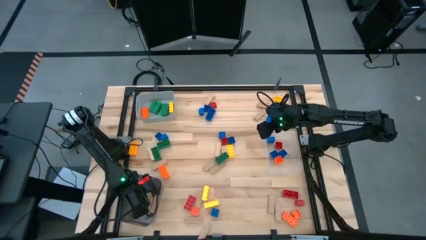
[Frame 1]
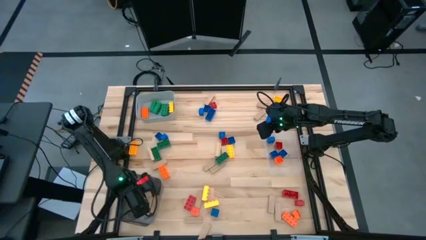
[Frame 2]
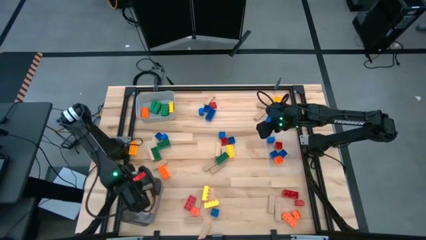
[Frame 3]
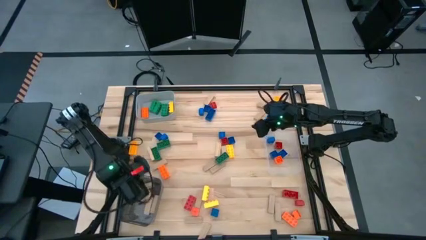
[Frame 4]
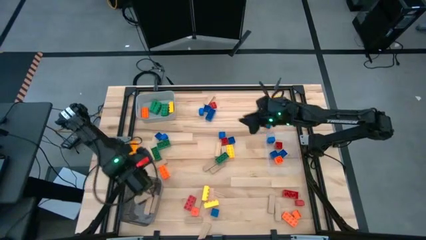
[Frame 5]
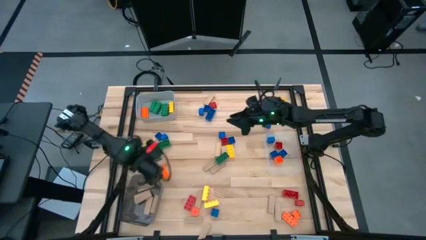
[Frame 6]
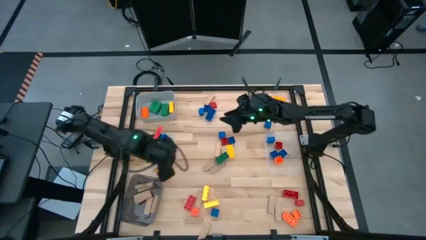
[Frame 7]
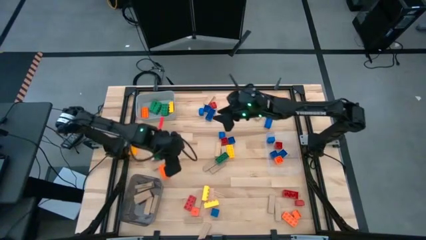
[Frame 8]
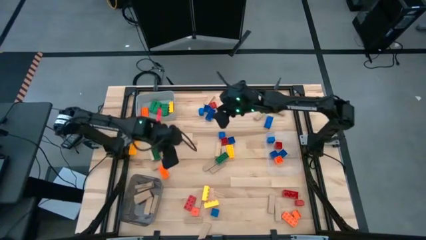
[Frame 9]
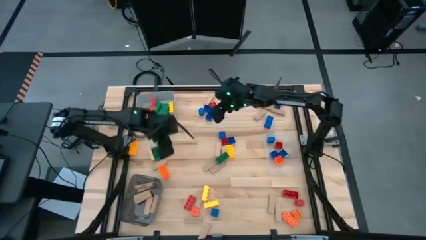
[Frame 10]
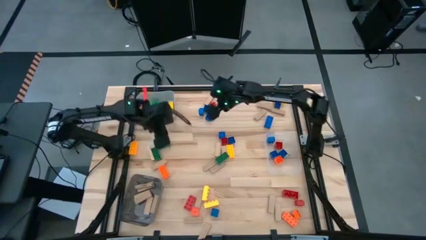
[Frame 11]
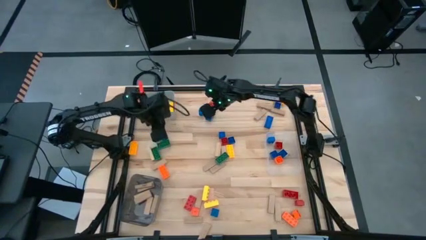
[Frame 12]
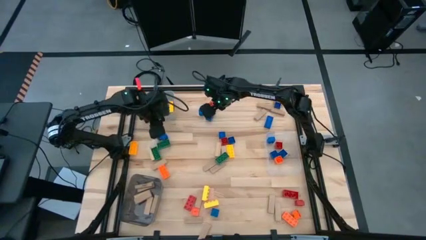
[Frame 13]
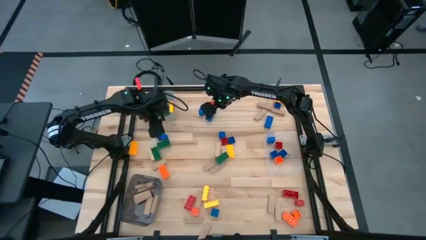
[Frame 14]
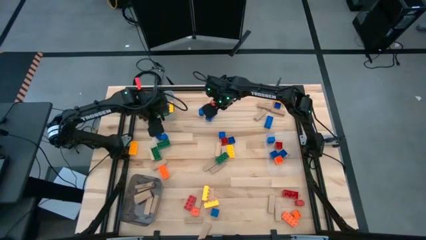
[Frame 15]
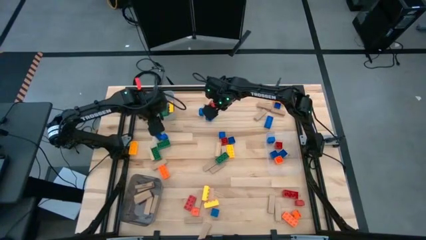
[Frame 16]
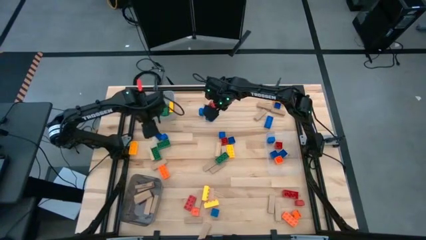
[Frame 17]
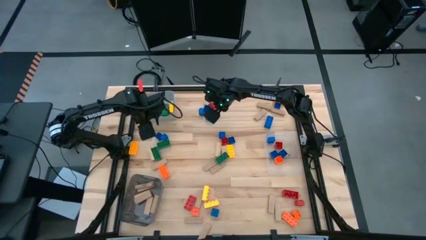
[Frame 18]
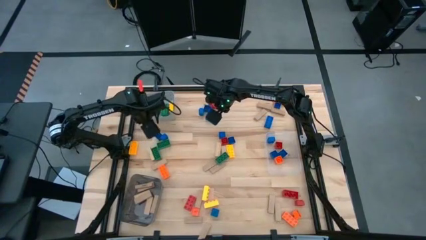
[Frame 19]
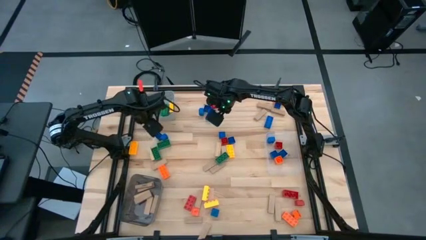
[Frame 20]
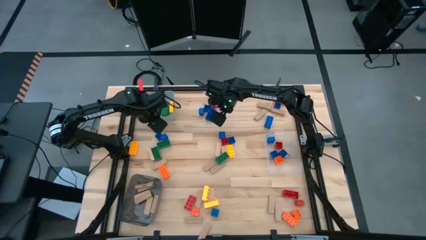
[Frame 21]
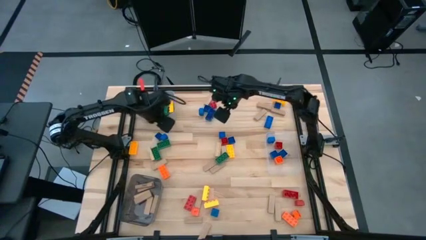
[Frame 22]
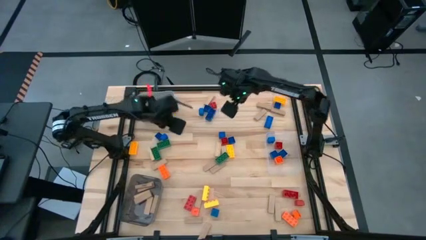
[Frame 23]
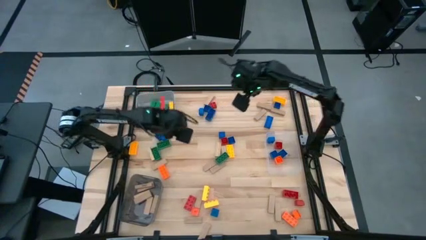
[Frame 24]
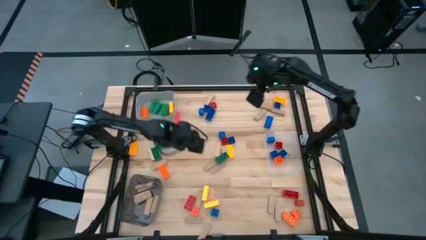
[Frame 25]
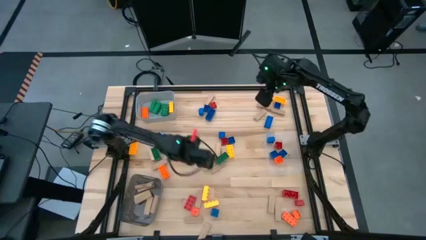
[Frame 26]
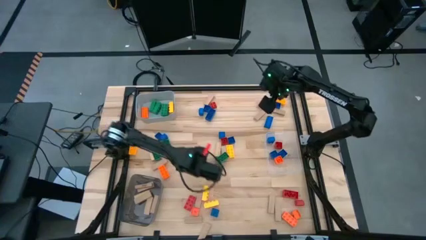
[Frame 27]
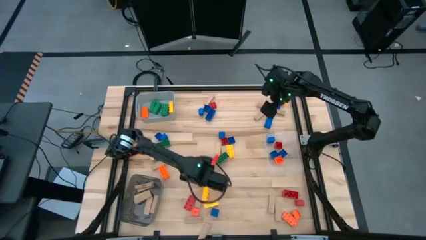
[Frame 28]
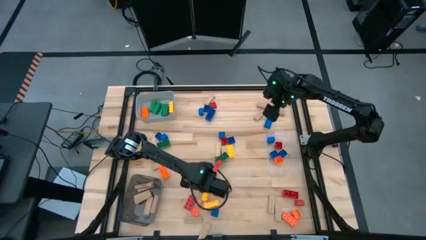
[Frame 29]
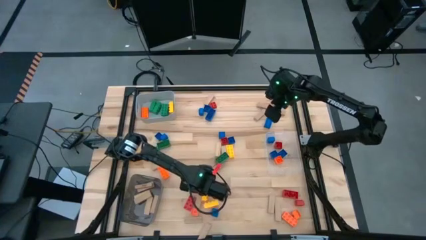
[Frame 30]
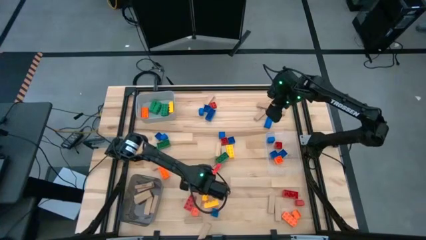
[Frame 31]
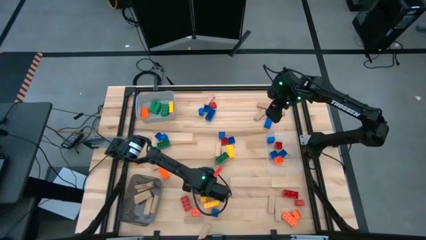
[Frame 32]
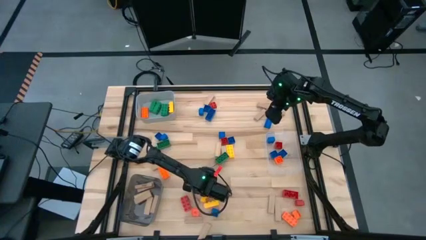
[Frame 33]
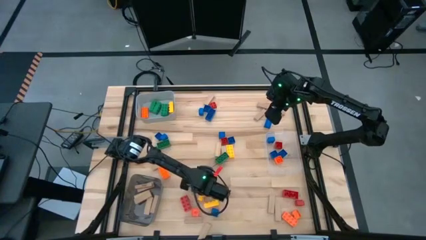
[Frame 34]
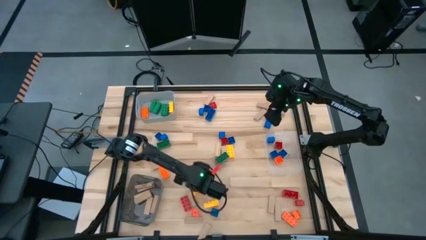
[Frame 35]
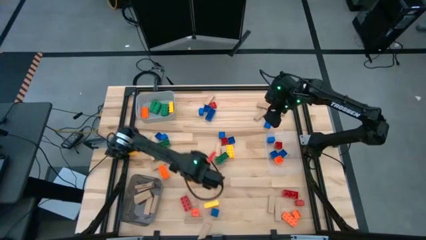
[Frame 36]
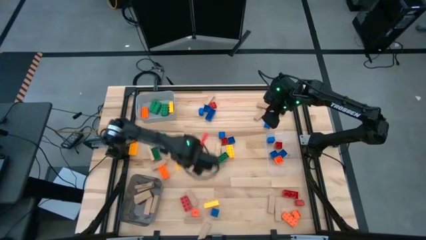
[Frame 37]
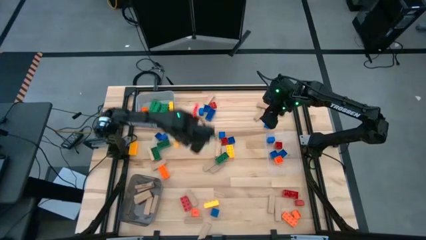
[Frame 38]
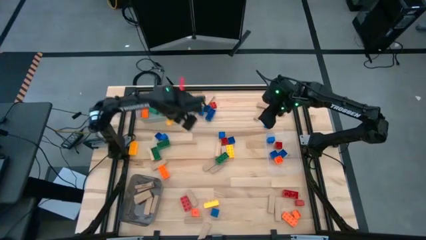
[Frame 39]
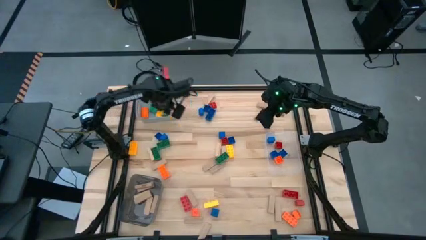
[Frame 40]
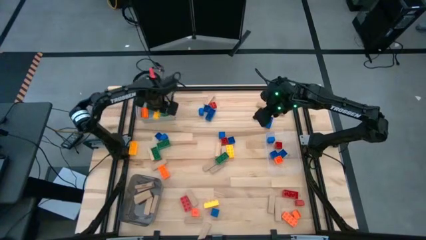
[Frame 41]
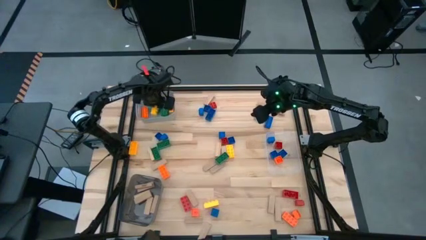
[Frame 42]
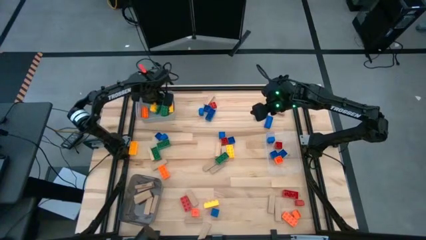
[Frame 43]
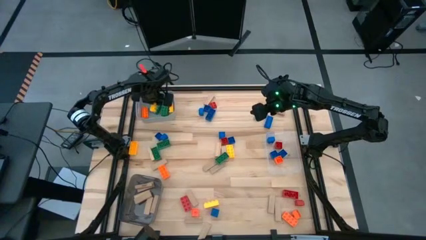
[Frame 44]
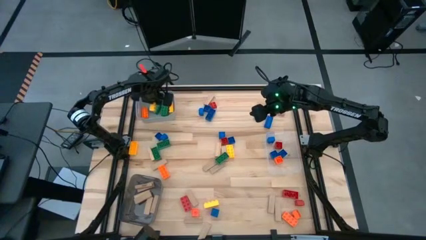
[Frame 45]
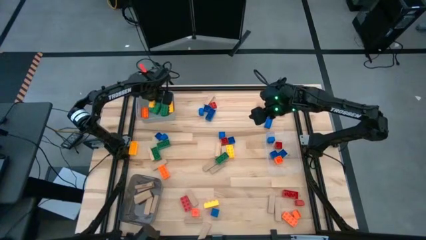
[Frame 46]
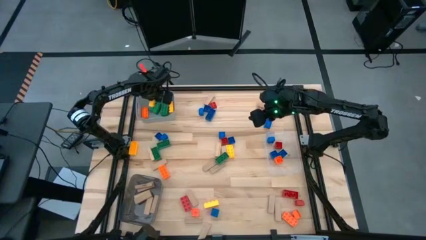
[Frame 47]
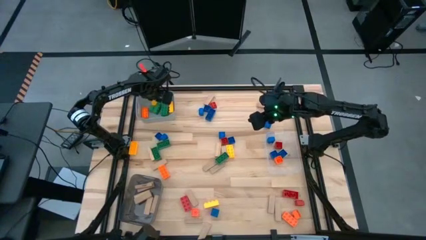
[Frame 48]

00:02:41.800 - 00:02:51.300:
Task: Sort blocks by size
Put the large yellow game piece into the gray bin

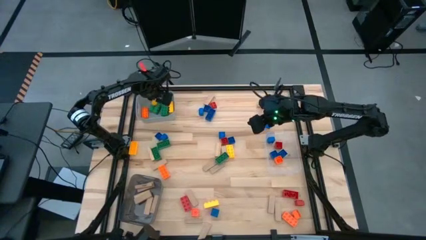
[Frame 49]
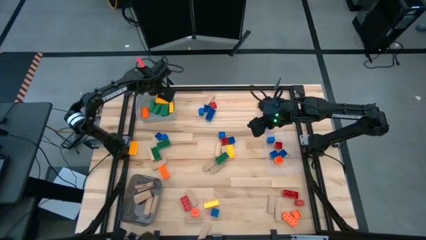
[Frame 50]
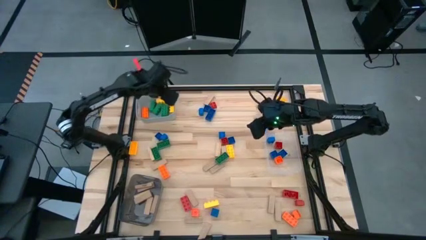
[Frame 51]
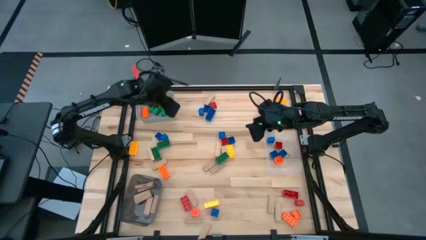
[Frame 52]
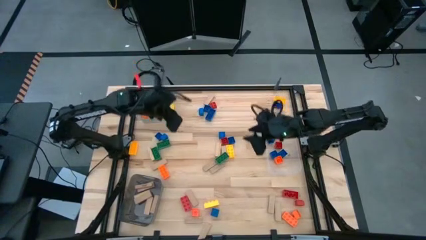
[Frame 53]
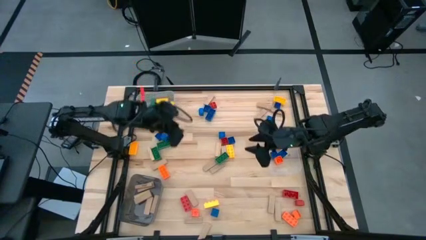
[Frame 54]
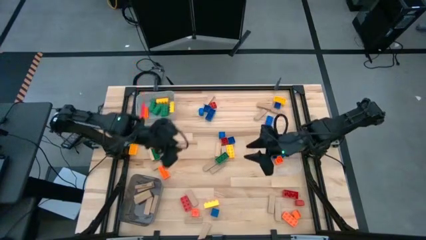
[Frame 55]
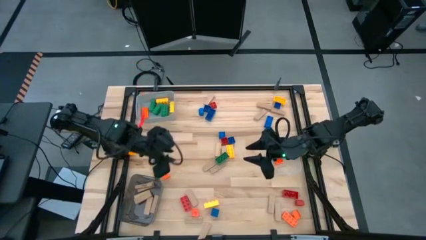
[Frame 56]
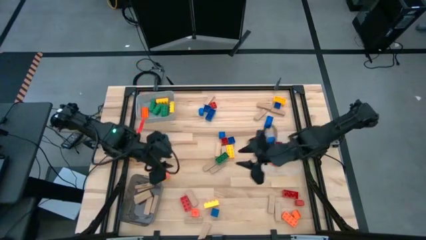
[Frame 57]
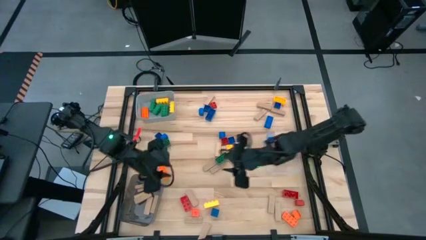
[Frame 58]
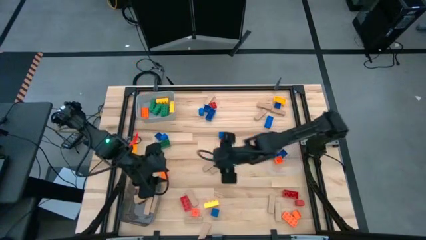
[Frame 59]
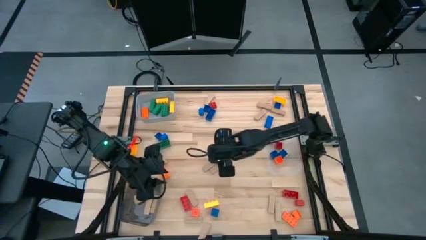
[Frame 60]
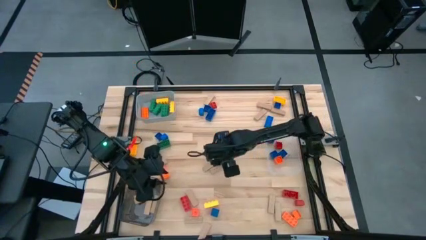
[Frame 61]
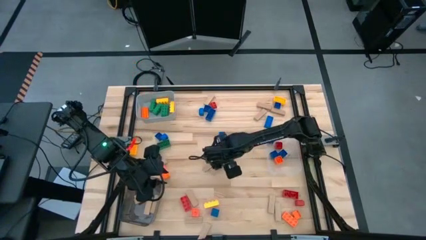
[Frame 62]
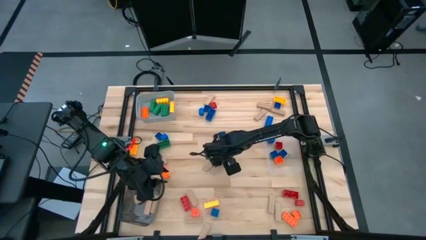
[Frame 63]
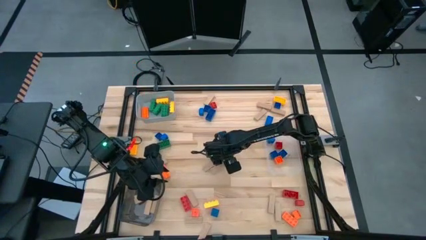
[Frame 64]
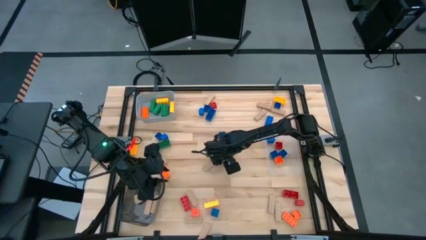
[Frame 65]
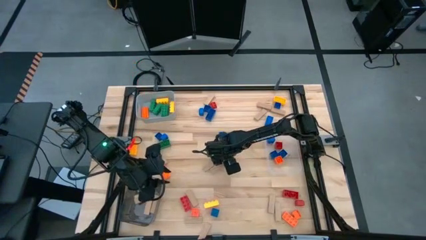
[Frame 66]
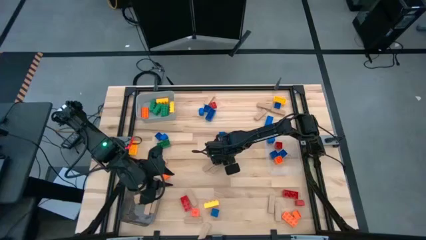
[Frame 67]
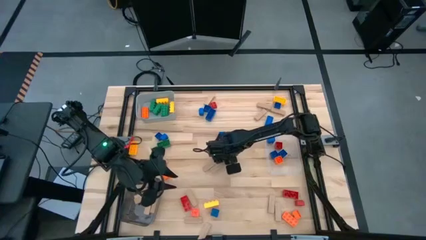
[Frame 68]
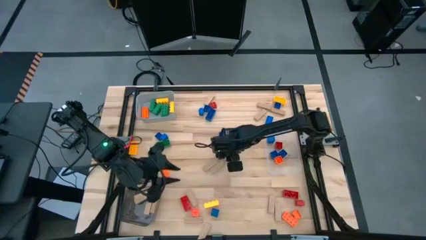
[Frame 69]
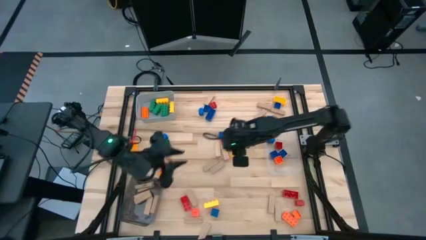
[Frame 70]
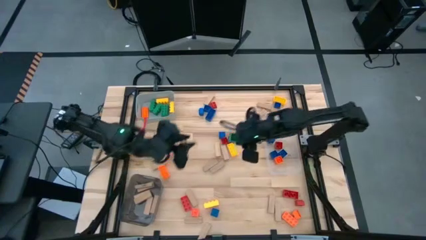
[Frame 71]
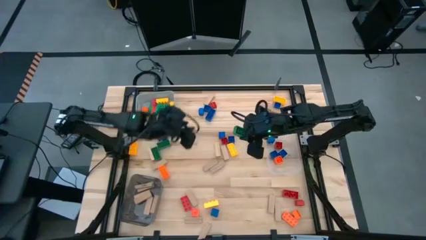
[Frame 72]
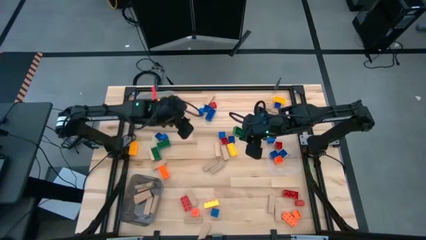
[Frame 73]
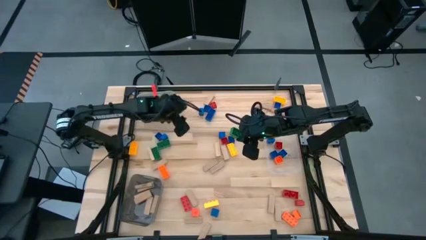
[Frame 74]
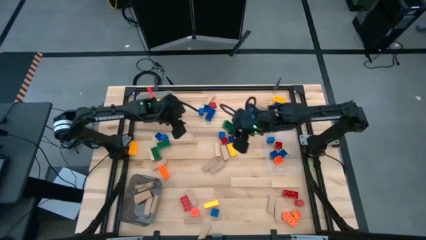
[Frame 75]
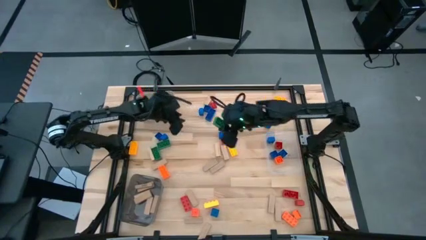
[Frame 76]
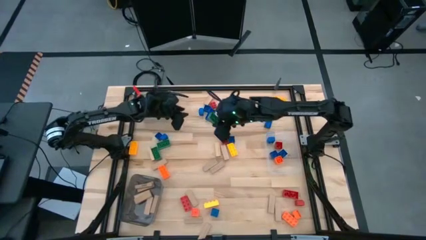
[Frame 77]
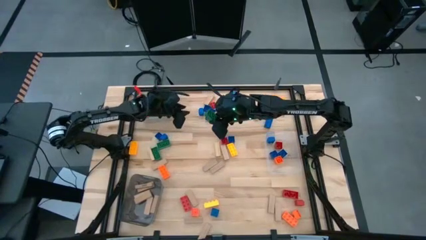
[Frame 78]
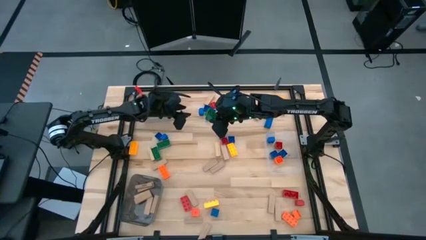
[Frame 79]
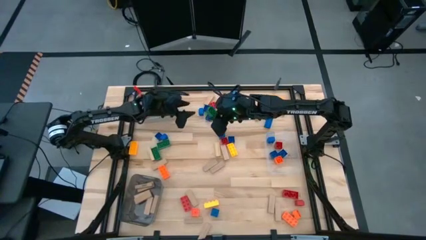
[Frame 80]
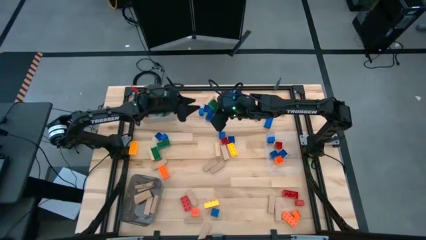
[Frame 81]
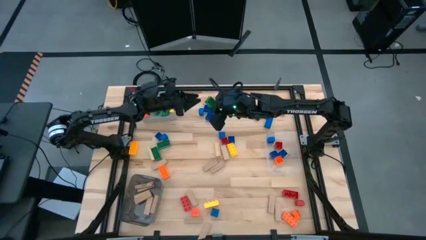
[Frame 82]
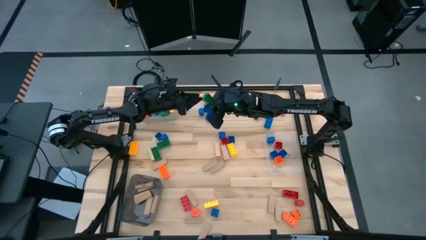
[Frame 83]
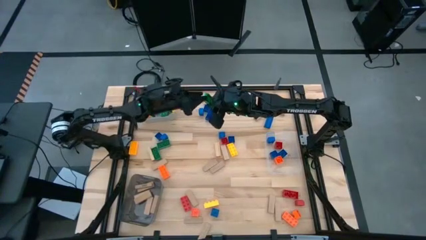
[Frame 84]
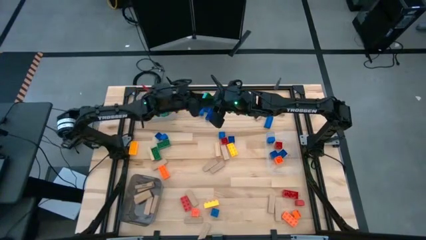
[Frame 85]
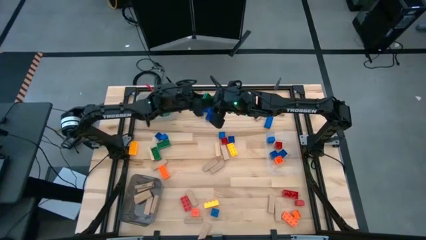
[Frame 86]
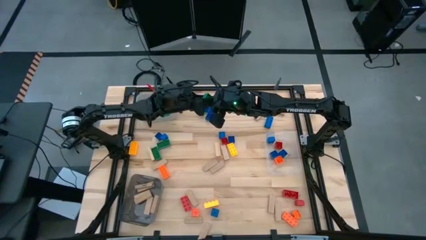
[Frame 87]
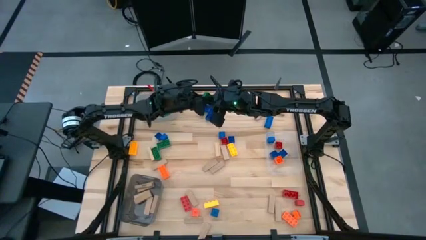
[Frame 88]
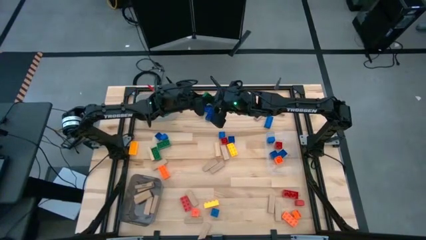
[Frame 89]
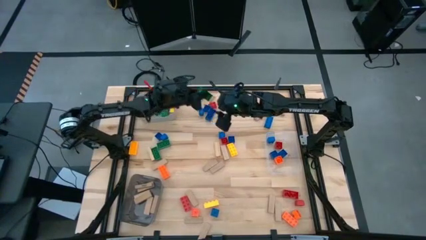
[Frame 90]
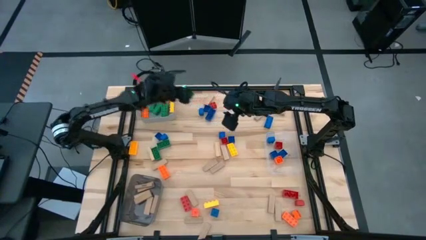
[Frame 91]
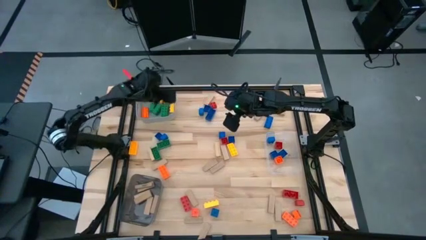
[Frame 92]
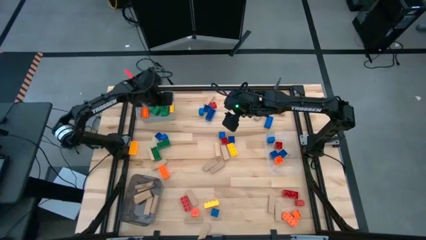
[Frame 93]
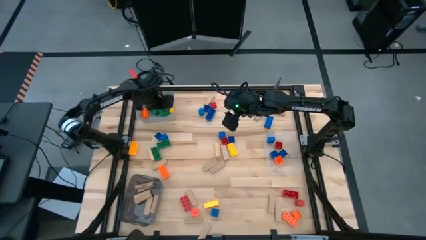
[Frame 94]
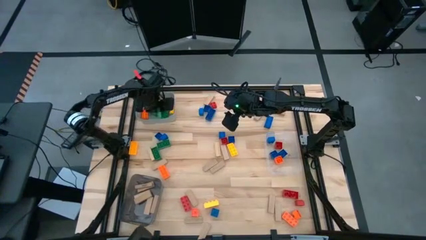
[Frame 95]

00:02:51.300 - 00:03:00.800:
Put the large green game piece into the gray bin
